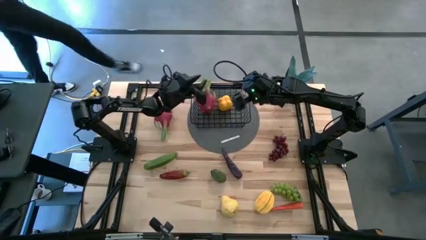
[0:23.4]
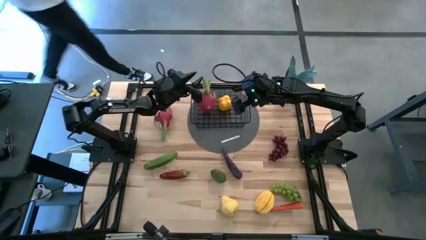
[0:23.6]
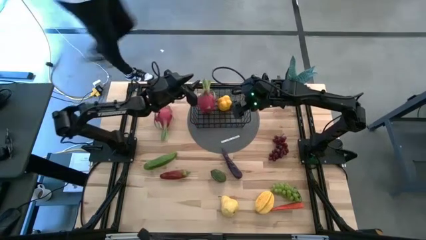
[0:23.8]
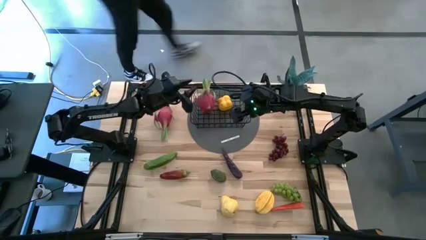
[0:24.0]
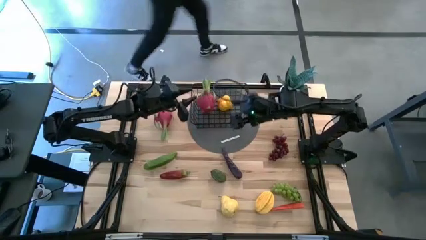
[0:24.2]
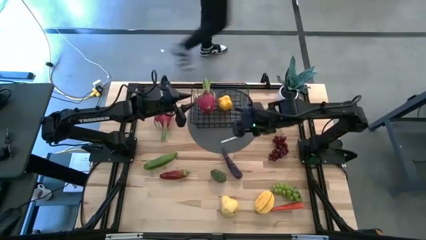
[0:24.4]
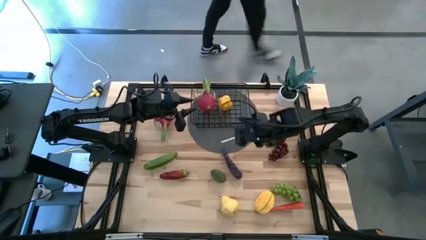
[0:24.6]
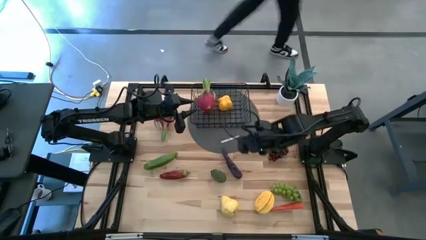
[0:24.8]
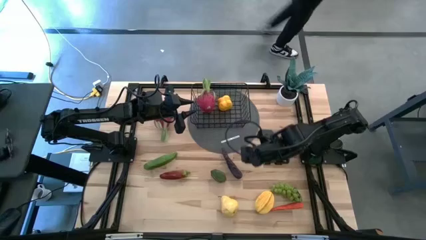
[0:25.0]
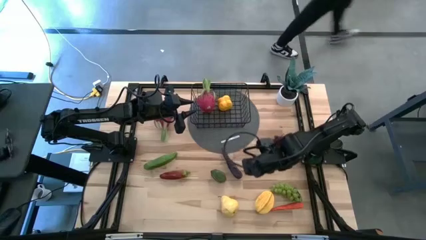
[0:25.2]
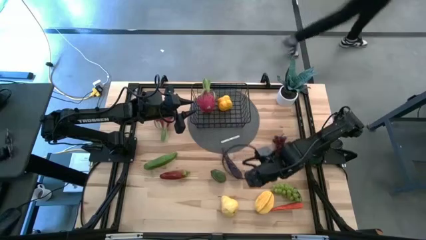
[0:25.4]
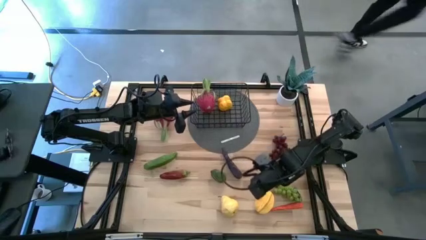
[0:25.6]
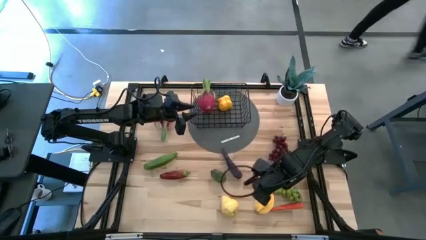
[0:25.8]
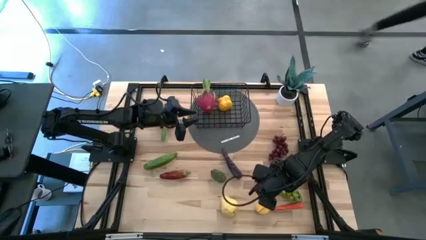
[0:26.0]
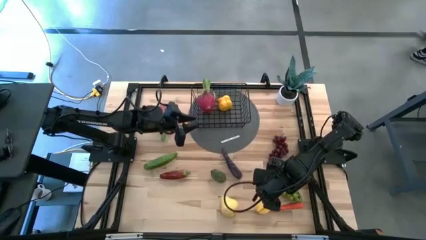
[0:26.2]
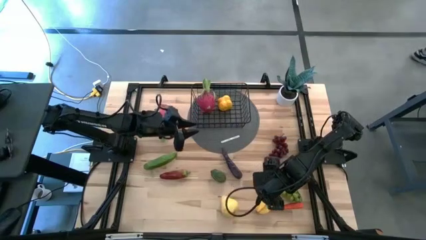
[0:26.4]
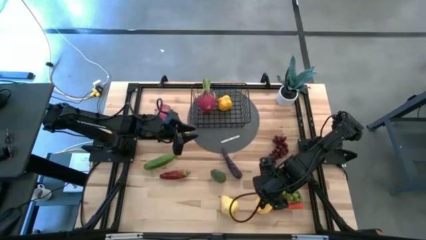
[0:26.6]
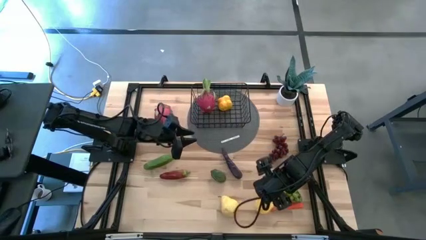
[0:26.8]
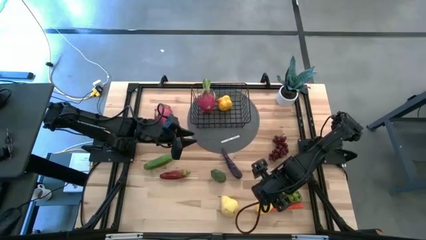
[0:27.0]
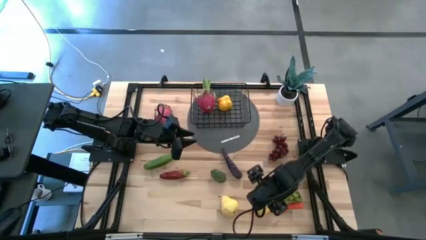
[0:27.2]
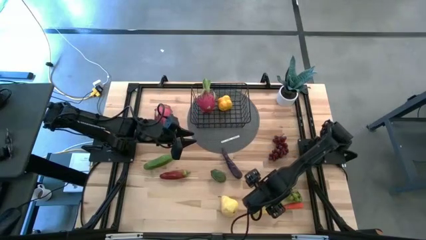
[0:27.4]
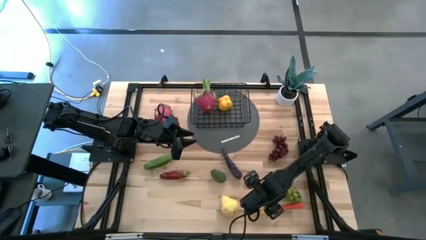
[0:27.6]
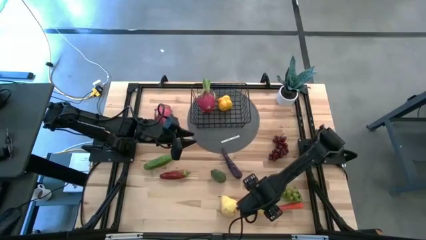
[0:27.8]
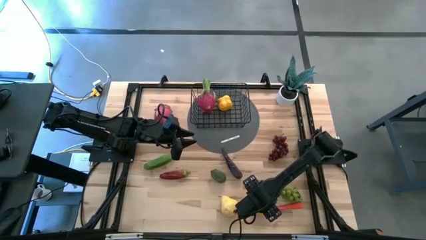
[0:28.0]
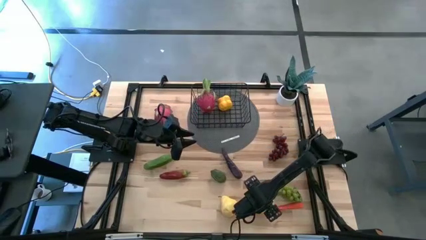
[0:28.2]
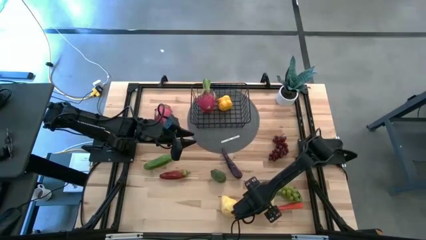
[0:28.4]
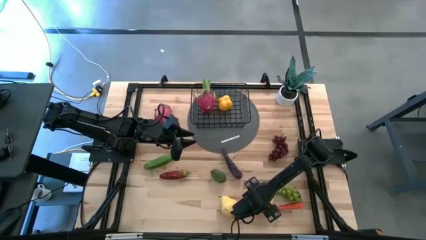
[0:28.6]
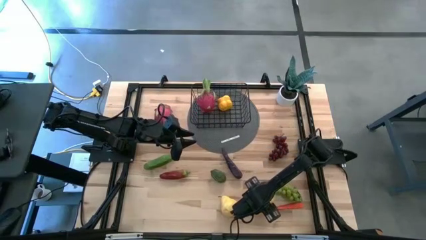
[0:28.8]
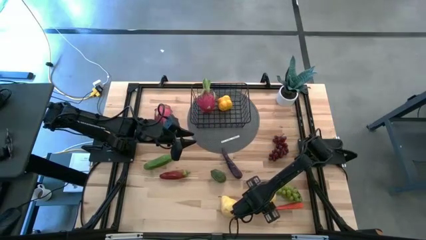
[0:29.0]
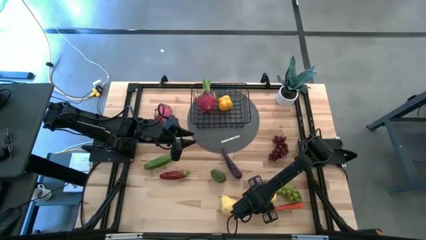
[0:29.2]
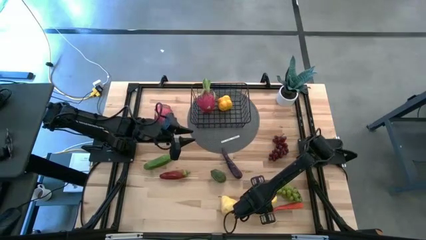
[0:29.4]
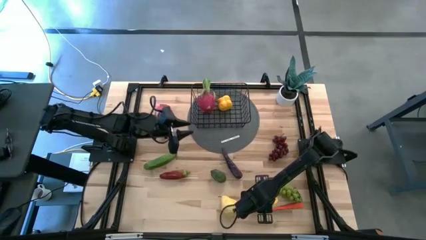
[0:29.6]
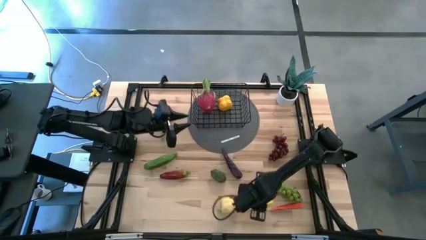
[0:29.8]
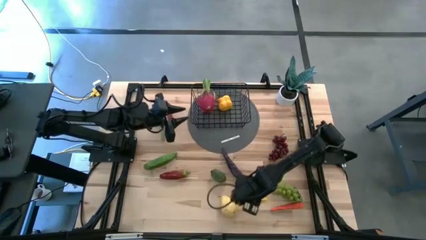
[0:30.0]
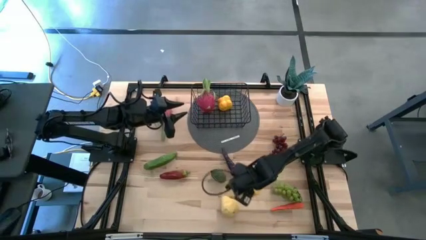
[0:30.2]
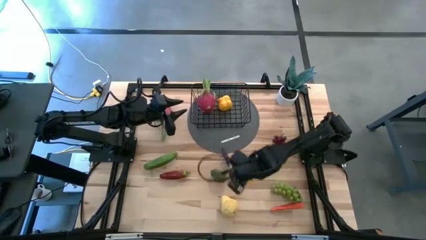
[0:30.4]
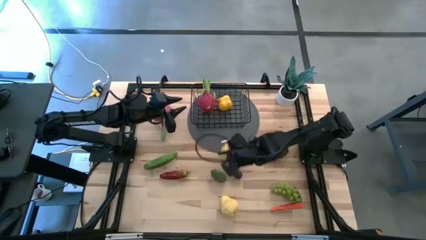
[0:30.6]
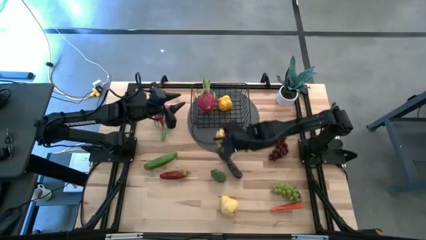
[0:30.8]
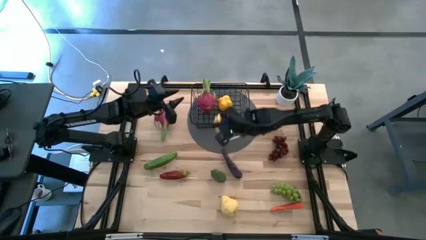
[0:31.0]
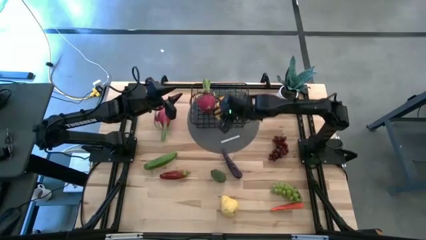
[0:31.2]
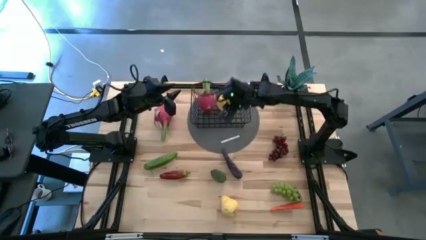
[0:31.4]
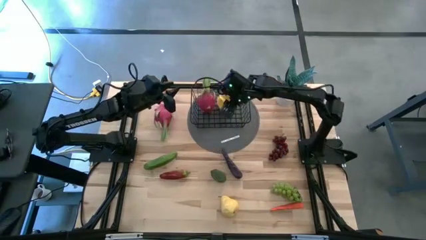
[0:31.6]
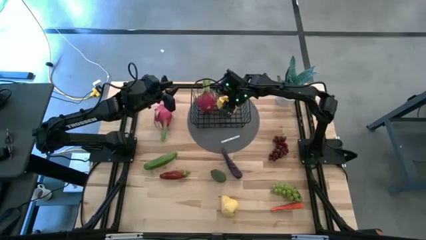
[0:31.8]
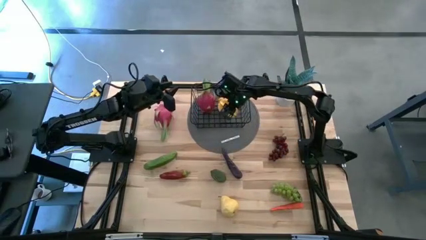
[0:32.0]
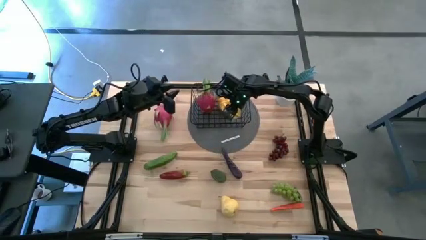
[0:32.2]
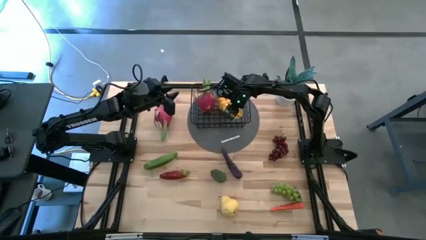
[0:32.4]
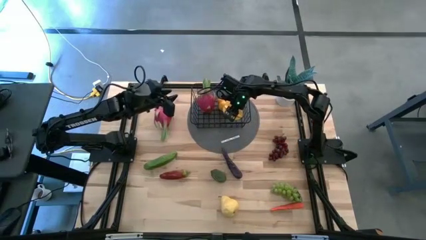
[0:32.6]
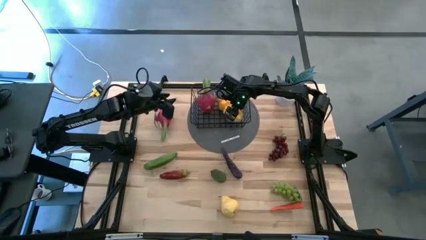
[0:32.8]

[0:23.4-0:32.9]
Task: Build produce basket
Put the yellow starfruit into the black wire basket

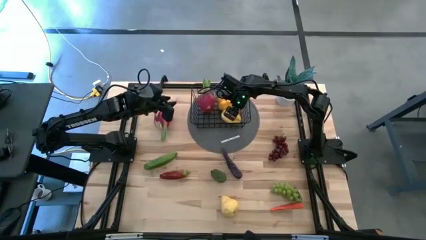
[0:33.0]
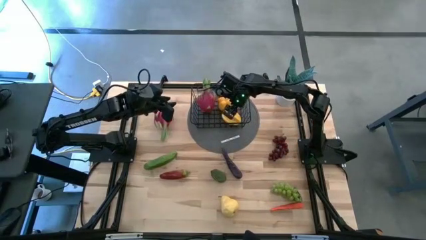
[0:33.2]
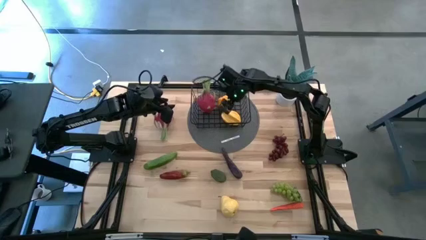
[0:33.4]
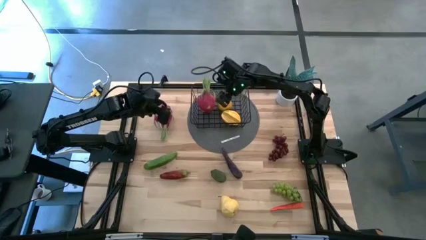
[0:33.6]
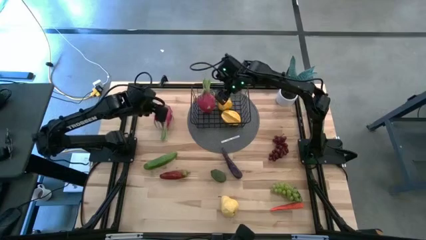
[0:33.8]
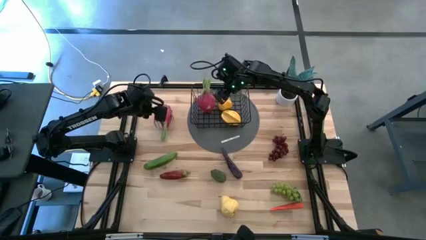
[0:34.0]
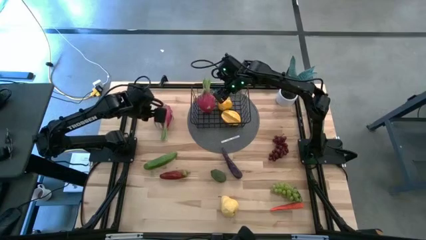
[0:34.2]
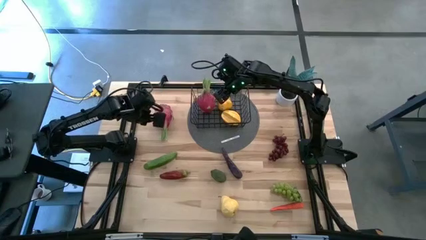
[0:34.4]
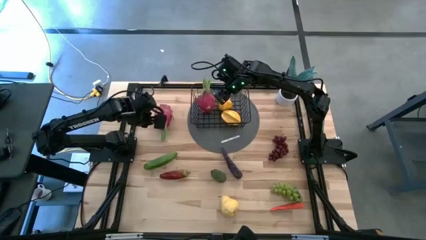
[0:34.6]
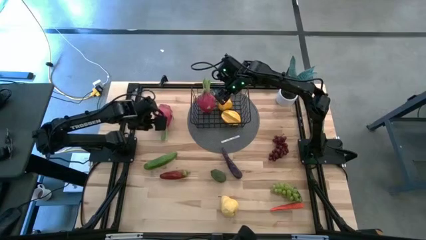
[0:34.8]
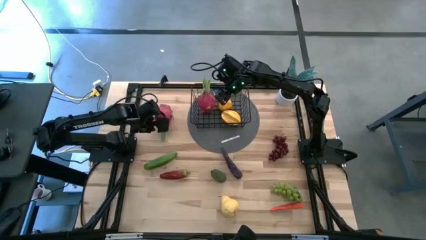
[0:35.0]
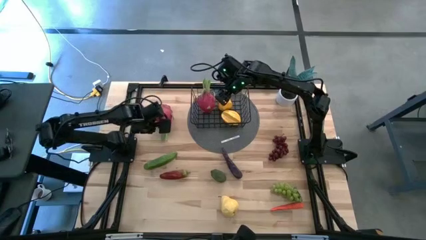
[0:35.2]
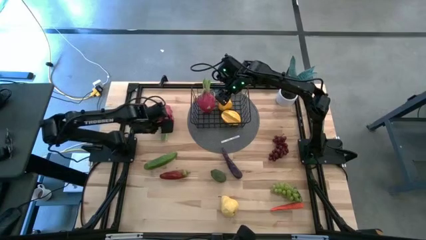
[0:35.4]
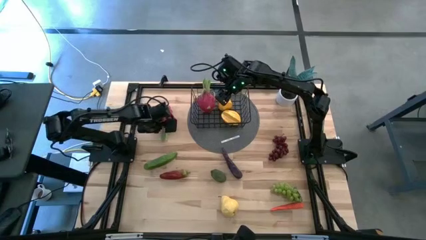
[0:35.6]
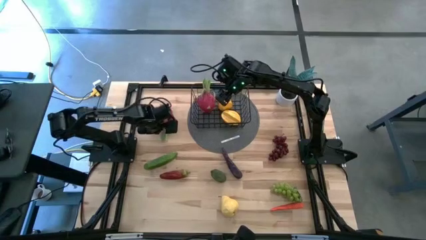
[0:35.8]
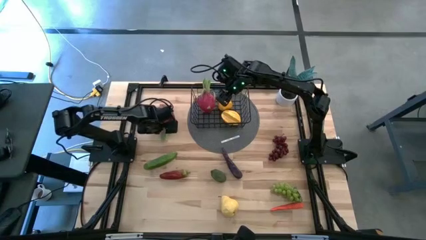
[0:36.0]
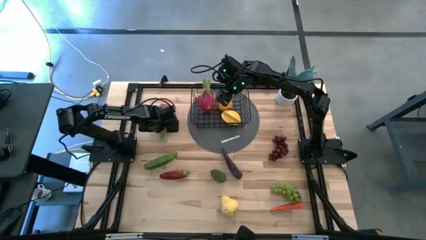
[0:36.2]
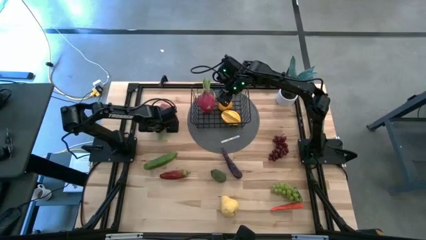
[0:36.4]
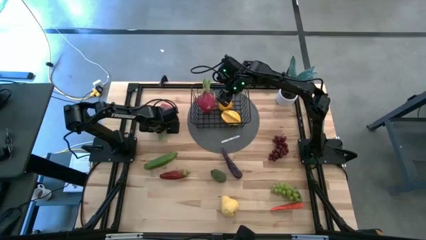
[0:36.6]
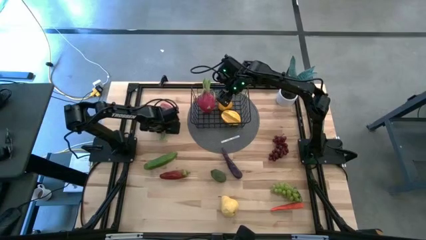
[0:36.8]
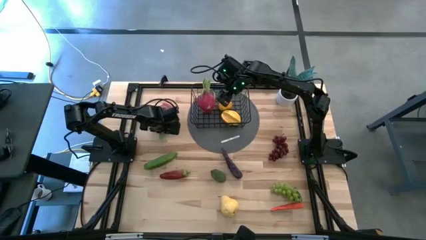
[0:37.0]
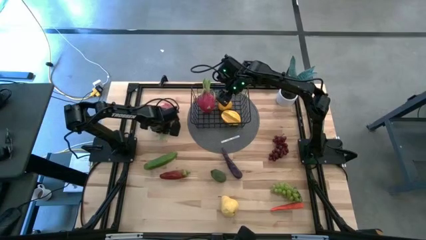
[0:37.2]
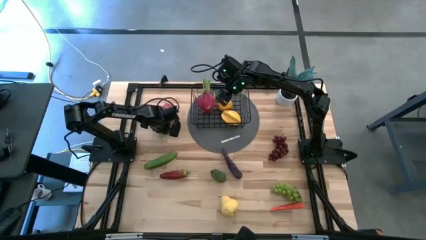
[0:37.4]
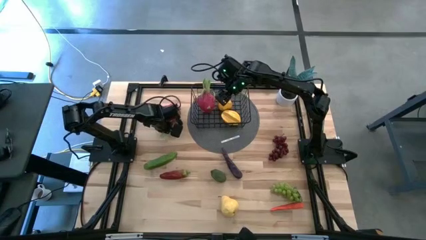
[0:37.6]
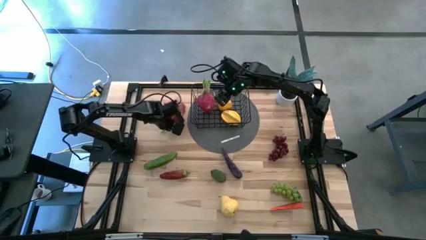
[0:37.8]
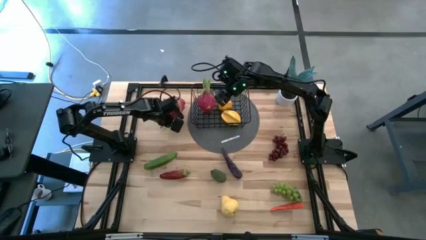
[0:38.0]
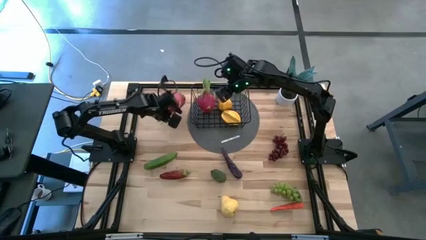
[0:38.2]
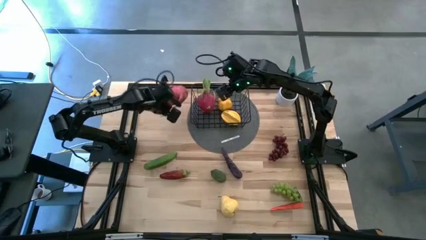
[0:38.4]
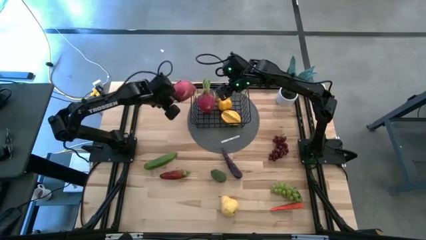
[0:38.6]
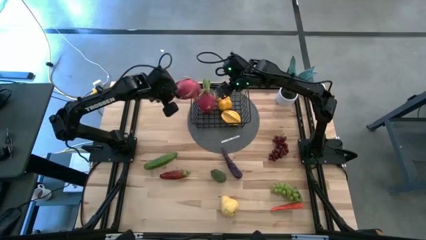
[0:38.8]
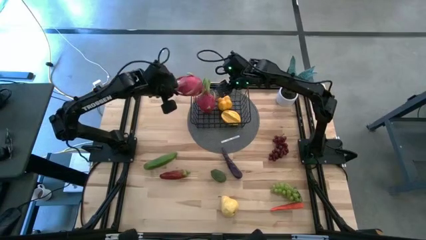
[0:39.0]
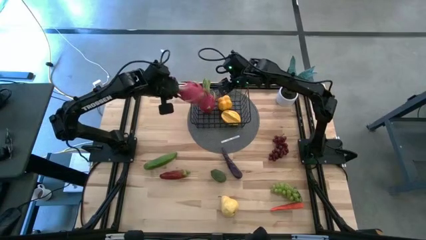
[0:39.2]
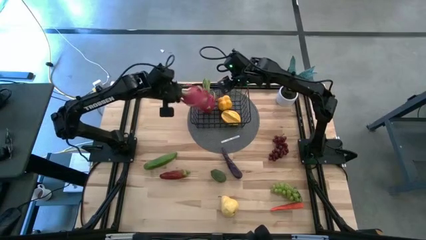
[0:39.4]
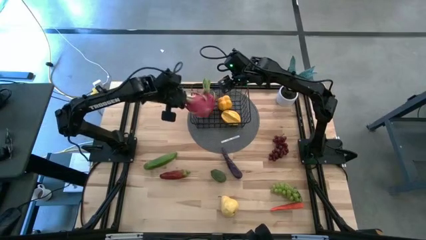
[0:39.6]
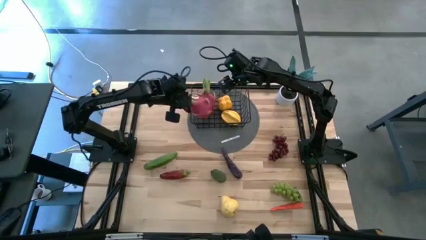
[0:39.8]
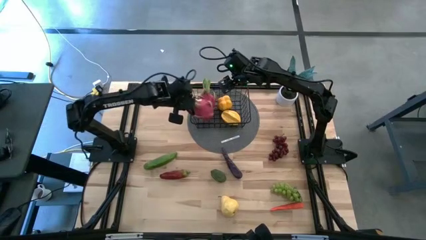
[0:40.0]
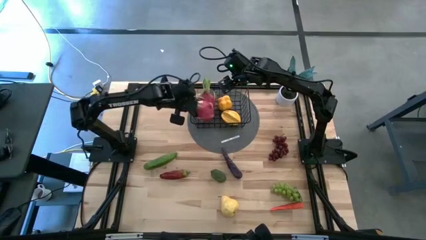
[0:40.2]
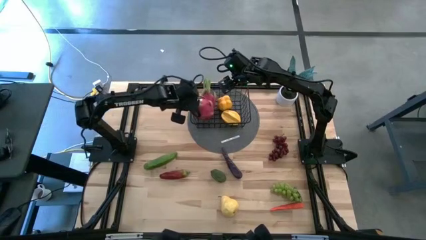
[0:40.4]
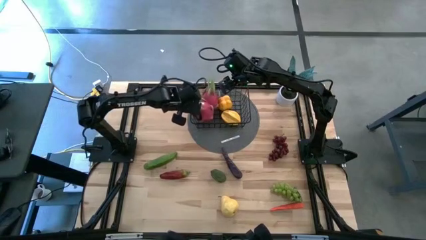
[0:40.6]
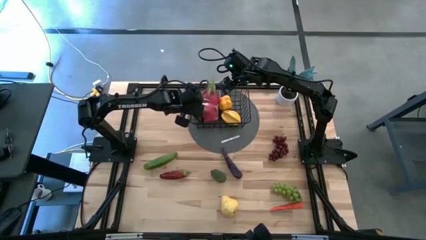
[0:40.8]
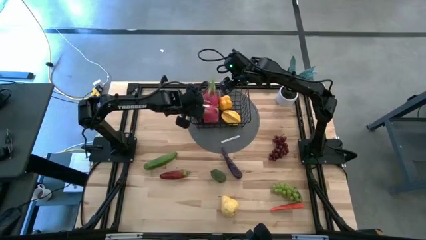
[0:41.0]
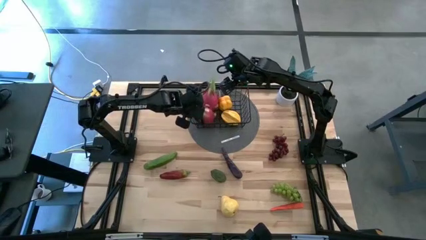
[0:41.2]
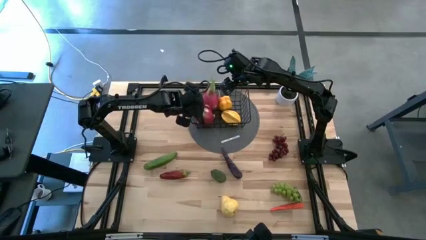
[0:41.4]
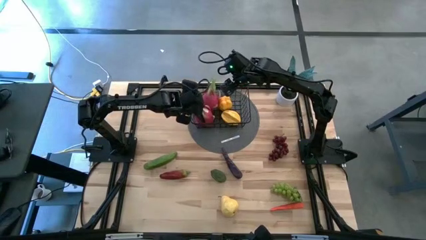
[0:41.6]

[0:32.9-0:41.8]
Put the pink dragon fruit into the black wire basket
